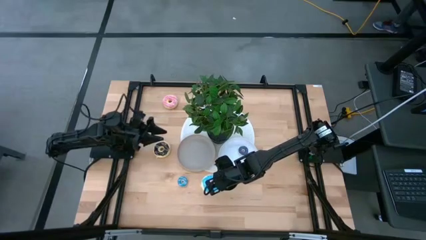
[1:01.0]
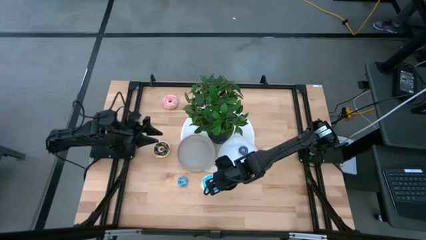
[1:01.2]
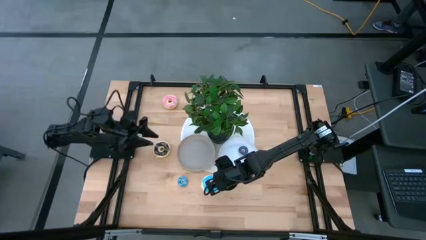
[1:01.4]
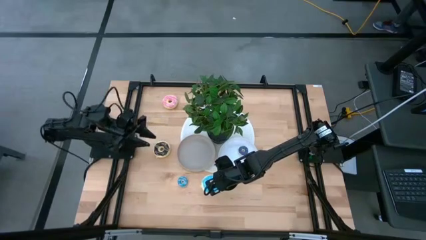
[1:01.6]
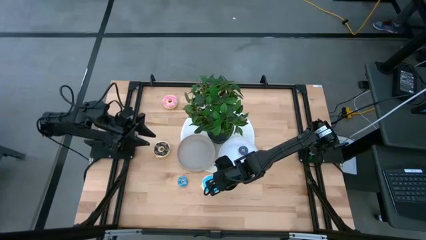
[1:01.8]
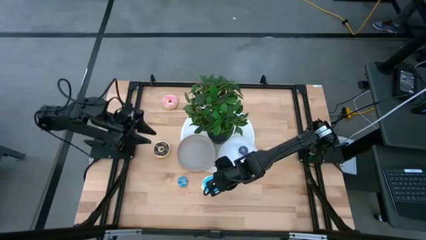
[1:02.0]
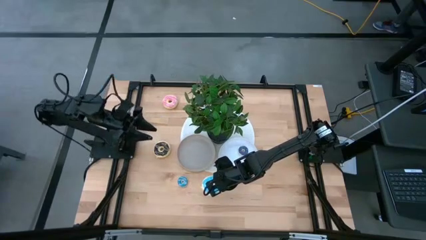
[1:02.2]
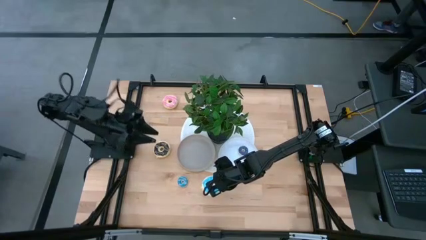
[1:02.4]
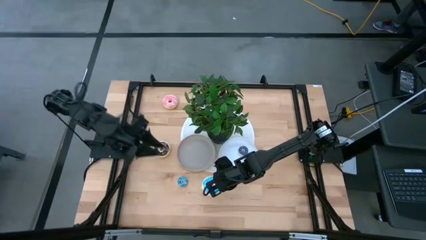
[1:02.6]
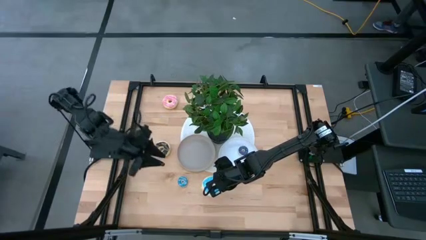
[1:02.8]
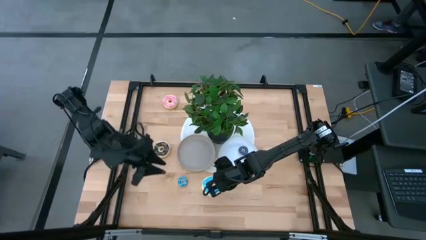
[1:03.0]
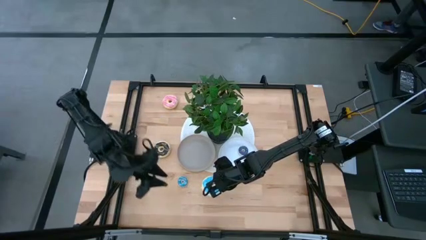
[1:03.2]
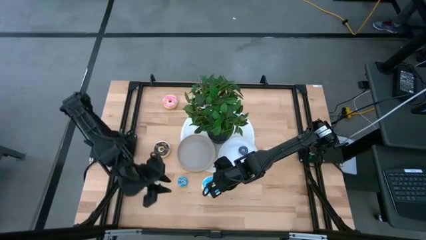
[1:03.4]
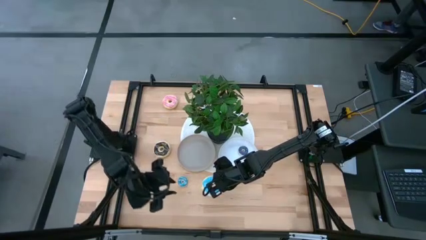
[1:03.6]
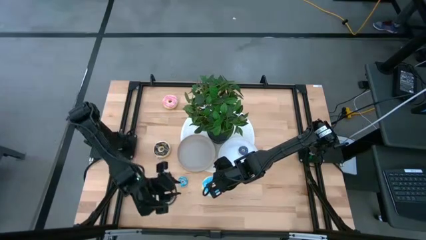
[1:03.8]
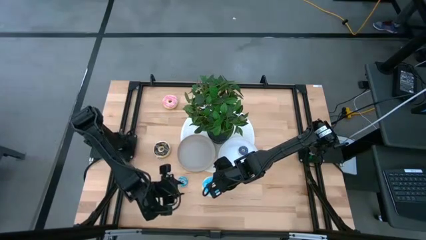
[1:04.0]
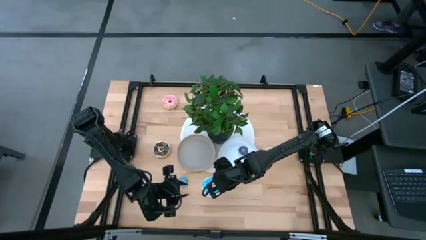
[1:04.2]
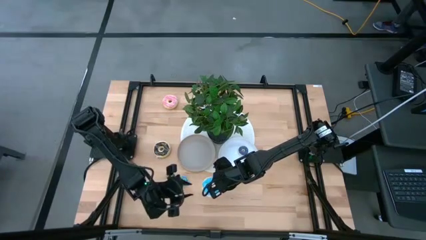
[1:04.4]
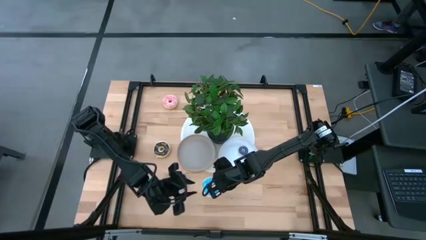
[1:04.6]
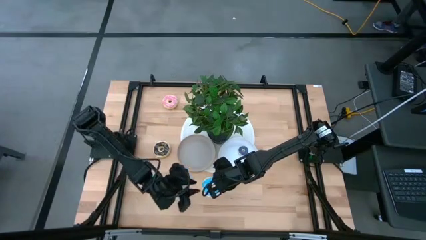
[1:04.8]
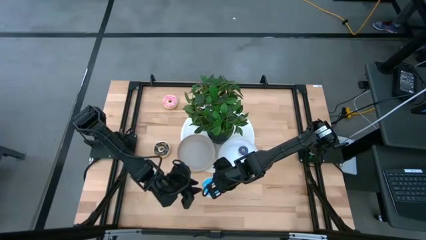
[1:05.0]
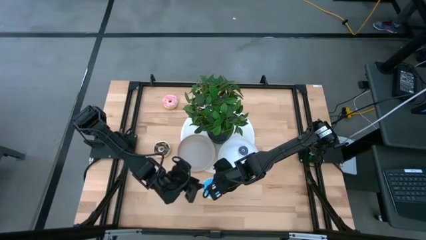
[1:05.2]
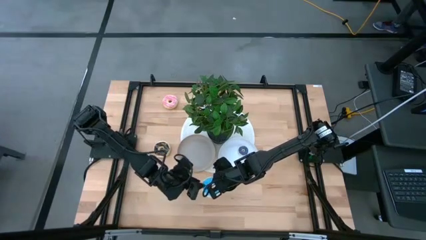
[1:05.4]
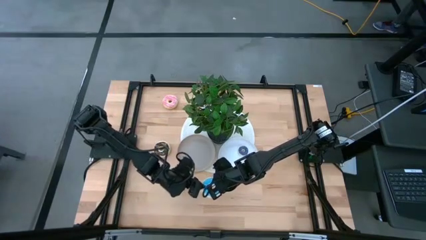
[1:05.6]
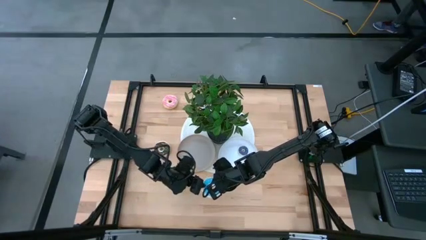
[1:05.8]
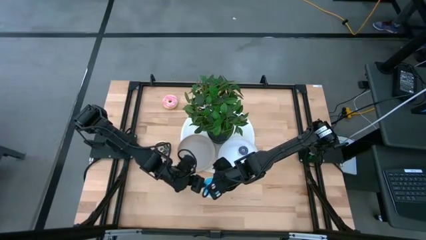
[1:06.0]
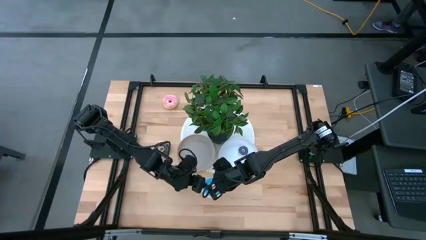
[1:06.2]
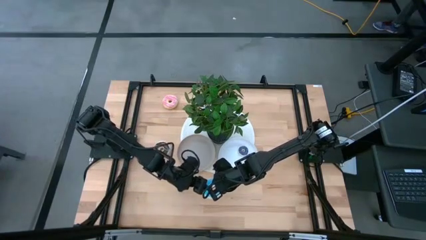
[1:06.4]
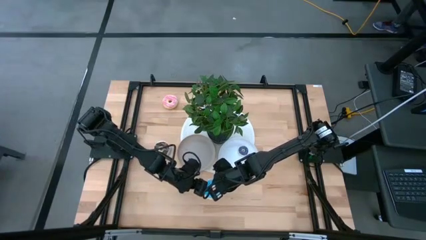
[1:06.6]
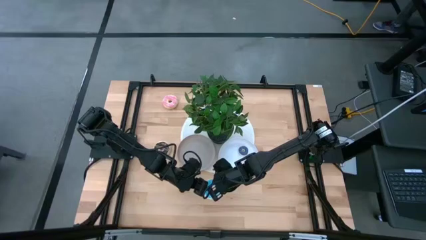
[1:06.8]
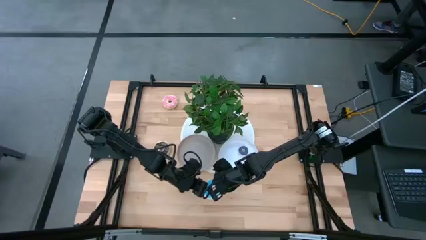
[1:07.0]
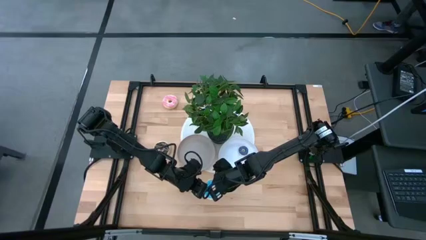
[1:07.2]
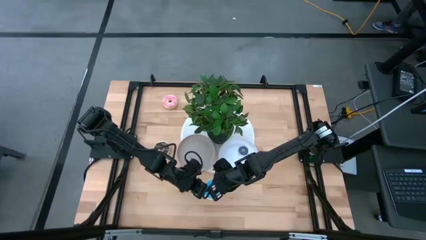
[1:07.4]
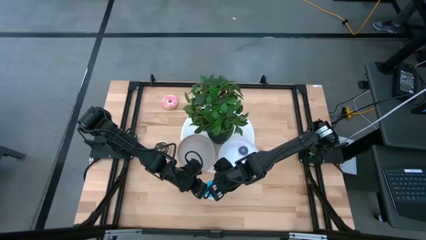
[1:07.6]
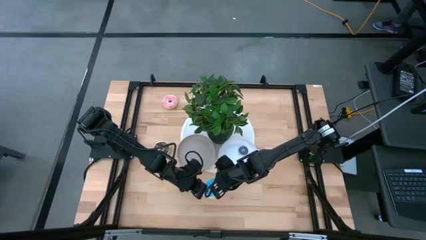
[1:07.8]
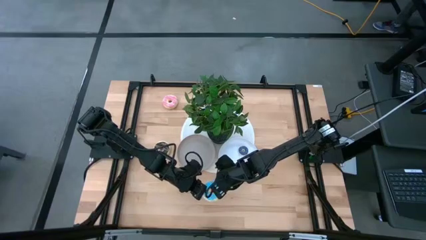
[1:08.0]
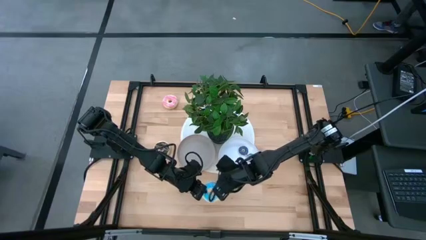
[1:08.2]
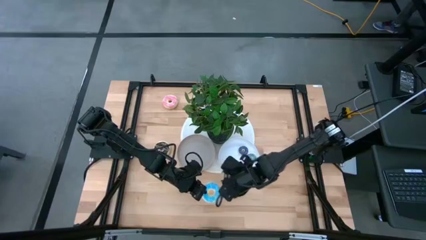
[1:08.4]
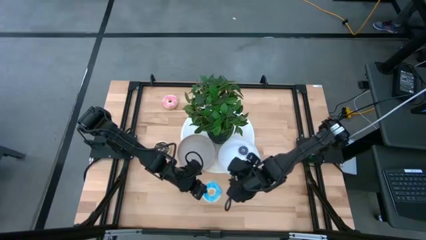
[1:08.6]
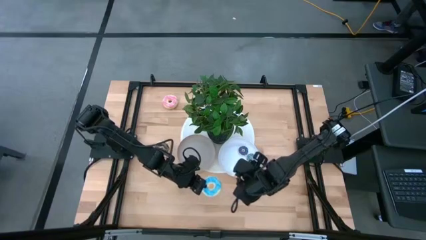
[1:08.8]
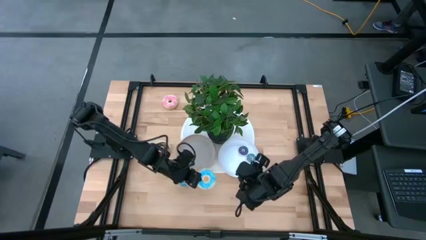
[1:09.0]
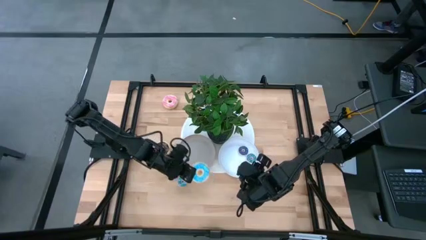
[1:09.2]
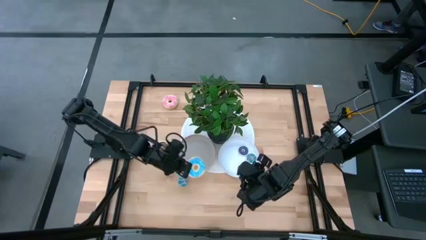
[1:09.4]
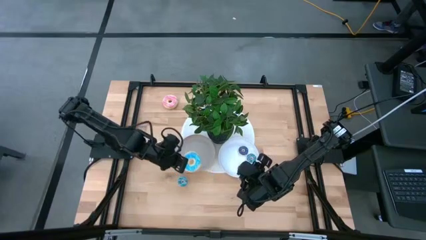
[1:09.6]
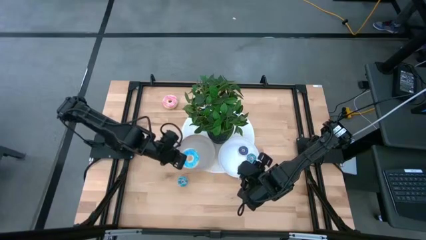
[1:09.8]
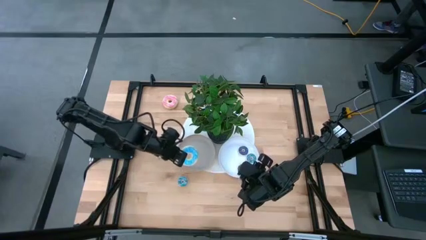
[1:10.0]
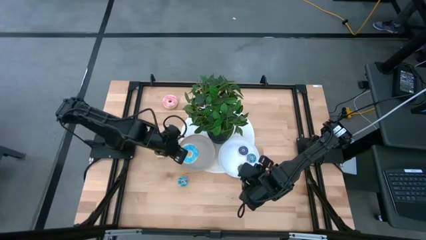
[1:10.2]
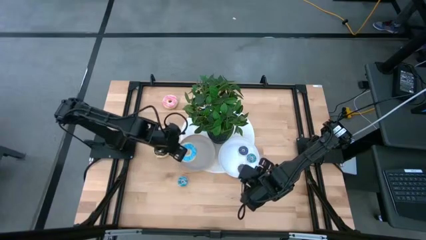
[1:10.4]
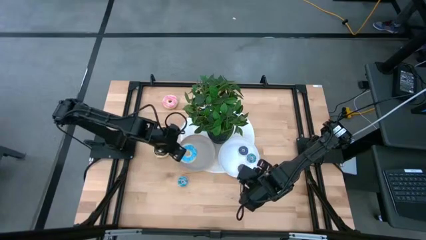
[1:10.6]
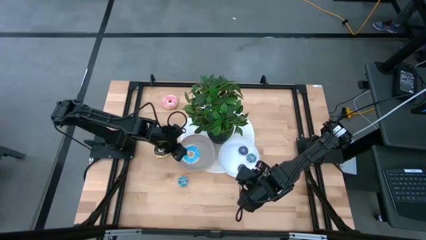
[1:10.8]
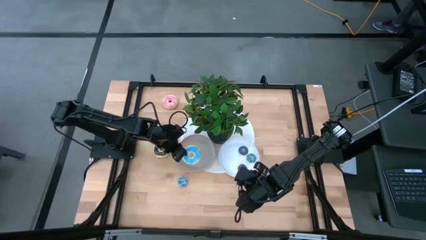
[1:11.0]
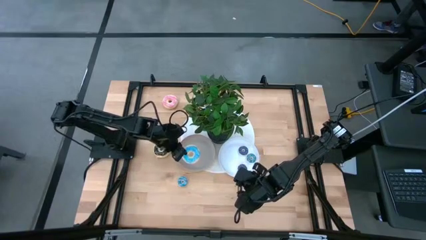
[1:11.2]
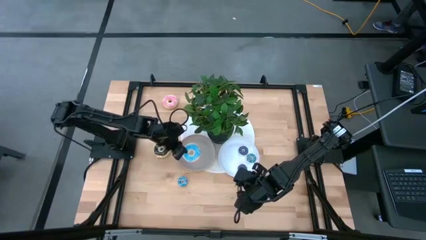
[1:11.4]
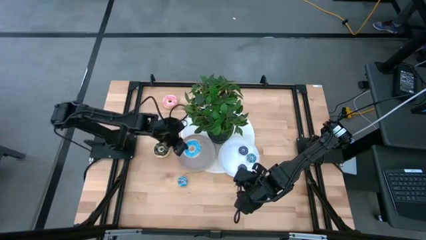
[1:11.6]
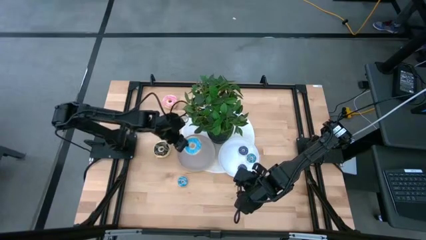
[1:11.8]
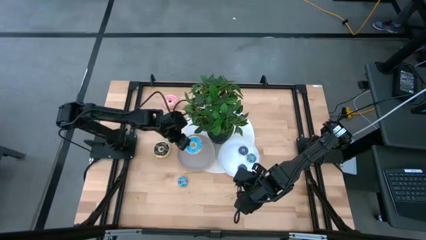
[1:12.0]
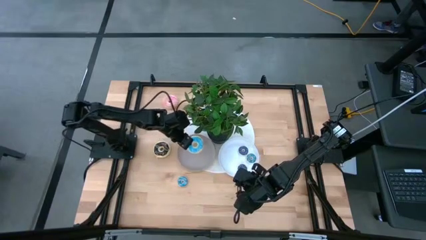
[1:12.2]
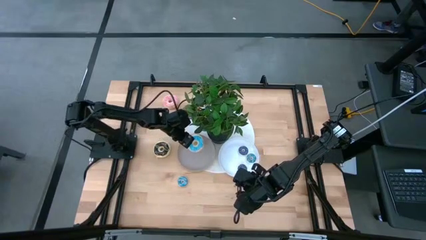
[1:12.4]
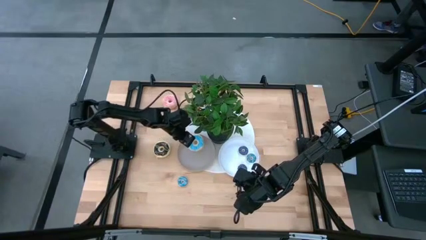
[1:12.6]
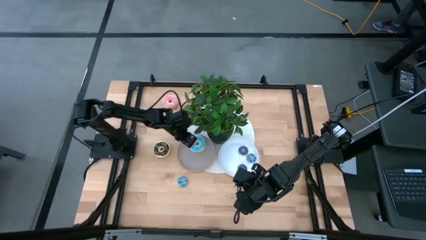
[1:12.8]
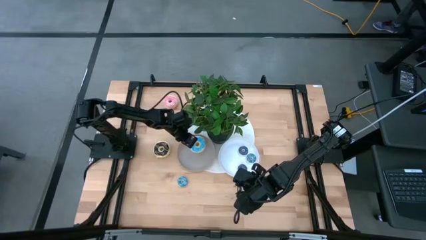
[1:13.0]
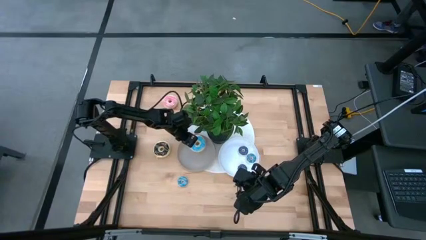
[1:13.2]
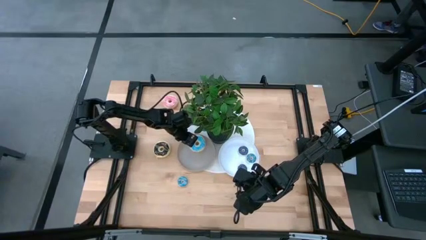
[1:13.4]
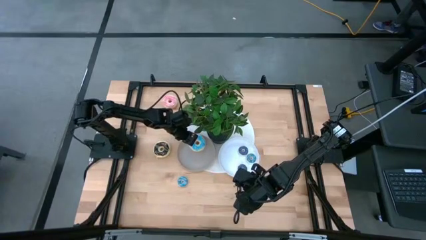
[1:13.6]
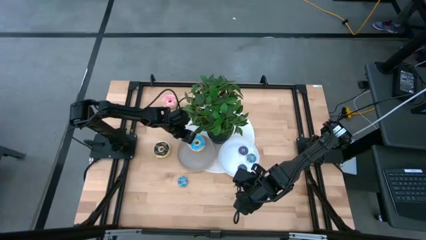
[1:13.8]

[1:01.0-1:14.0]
Task: Pick & Place donuts
Put the large blue donut on the beige plate

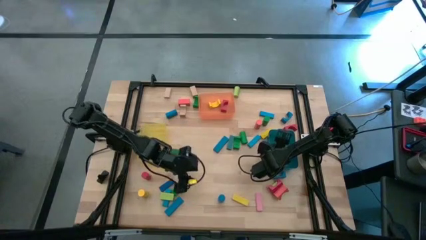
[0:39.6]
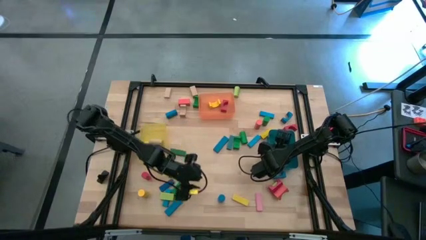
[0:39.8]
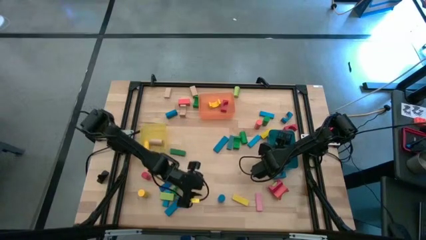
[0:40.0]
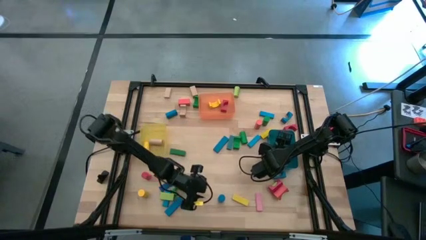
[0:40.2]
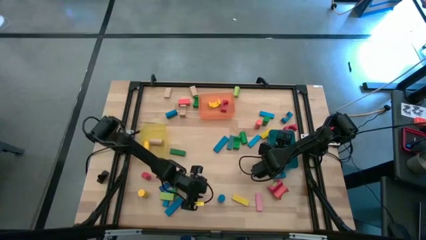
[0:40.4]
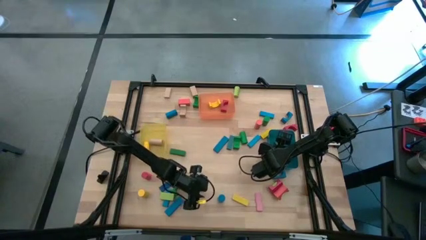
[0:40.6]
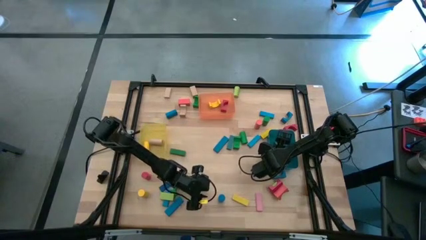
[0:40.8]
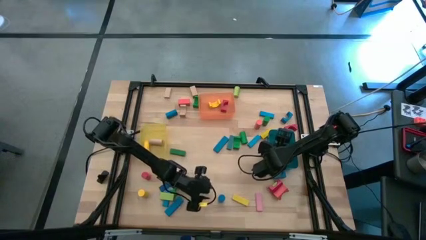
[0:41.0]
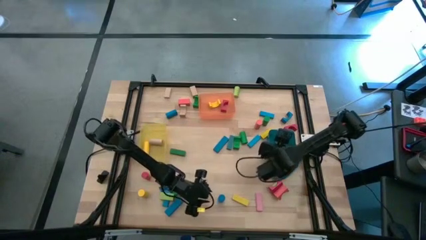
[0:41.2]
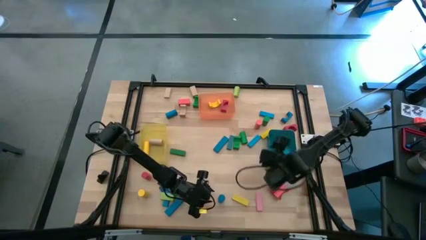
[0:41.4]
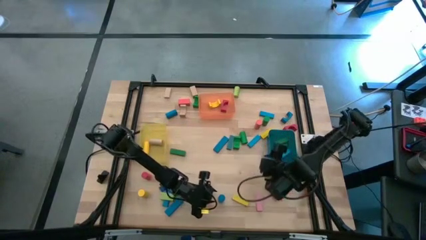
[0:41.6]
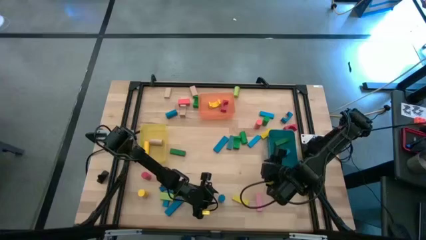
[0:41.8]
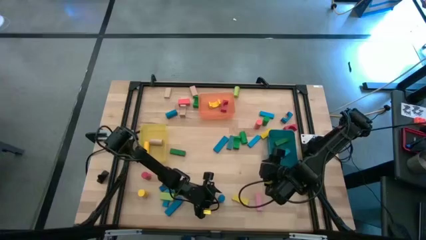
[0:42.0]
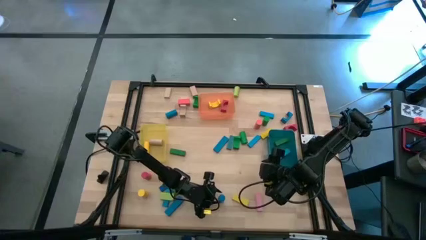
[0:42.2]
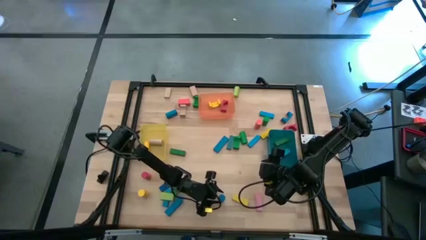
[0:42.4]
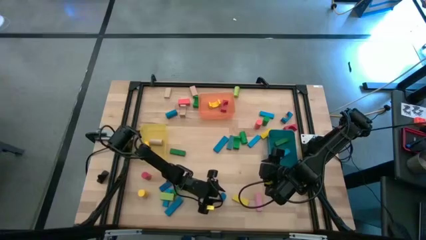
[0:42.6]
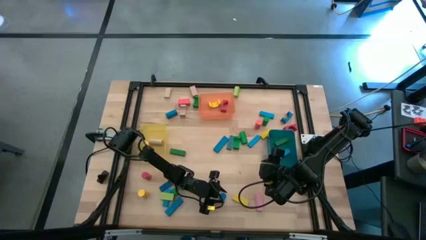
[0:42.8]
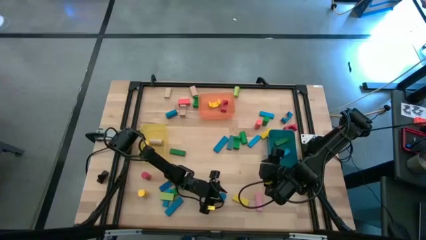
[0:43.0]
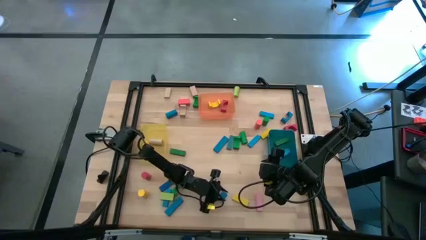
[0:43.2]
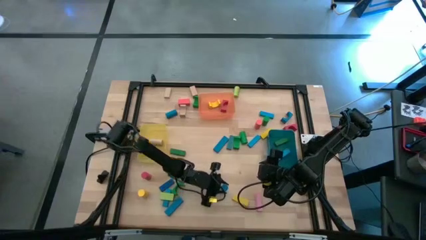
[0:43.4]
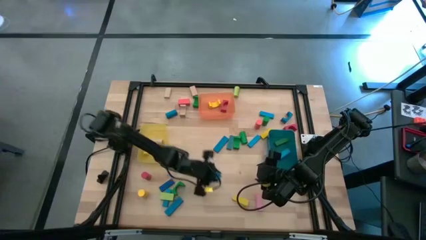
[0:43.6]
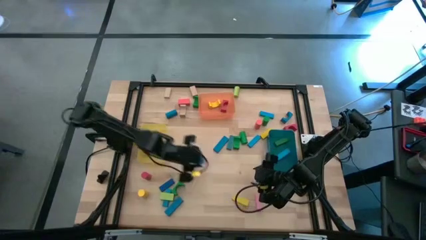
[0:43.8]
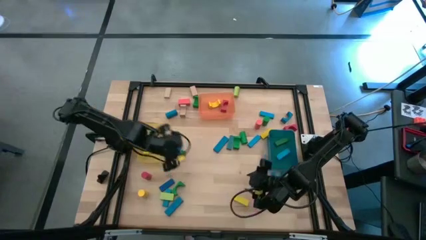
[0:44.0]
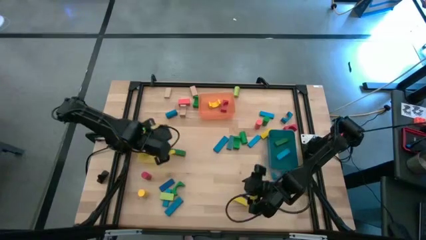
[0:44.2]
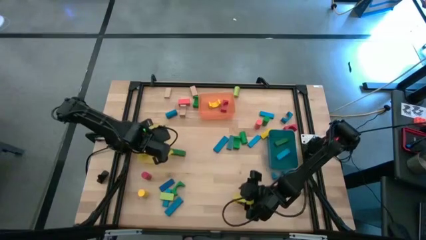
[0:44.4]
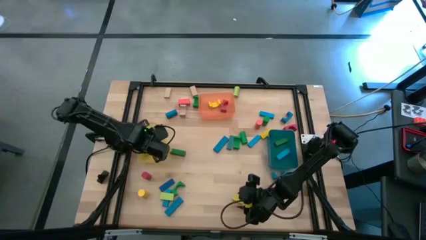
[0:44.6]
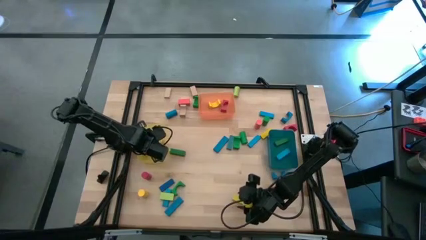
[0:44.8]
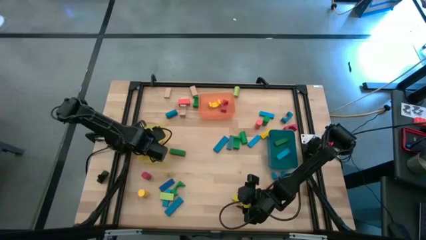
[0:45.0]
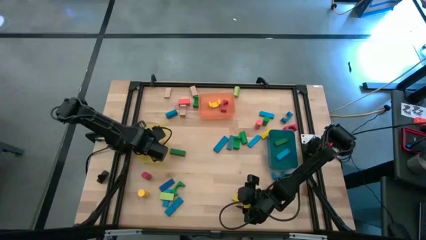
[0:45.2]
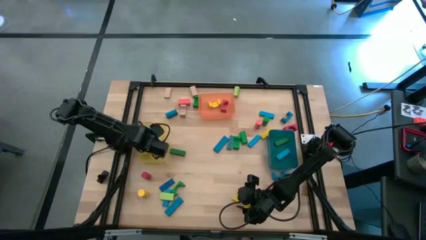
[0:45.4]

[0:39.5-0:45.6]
Task: Sort blocks by size
Put the blue cylindrical block into the yellow bin
